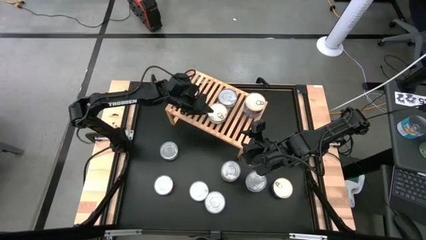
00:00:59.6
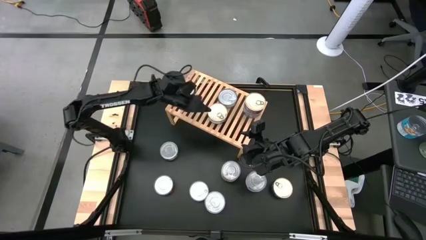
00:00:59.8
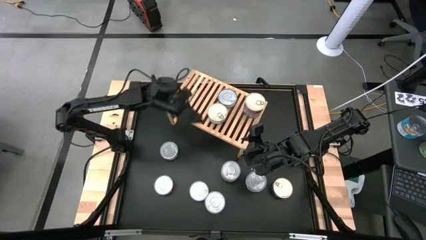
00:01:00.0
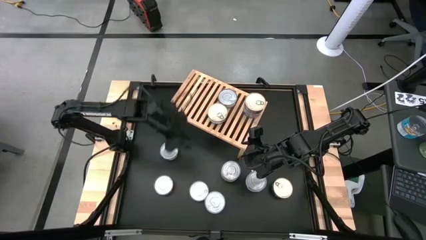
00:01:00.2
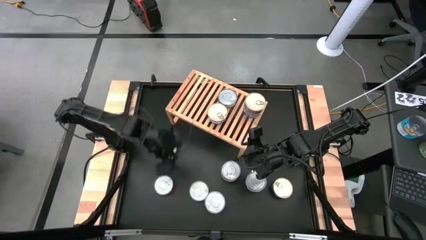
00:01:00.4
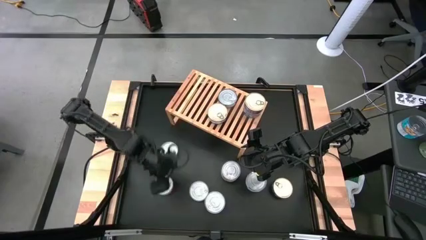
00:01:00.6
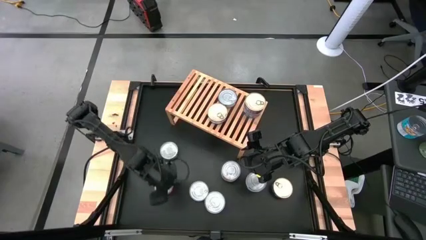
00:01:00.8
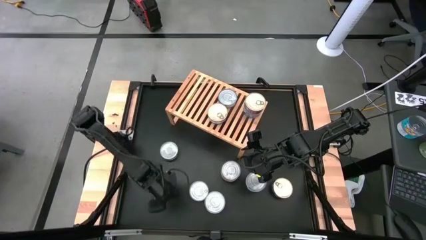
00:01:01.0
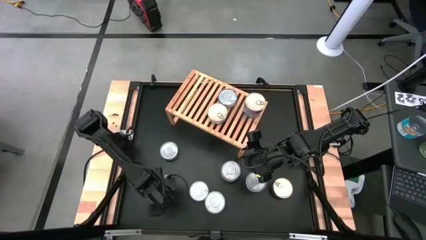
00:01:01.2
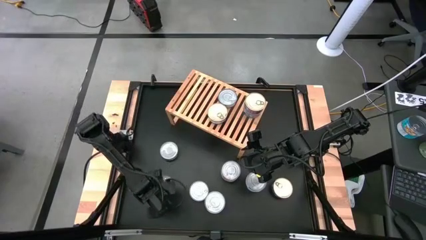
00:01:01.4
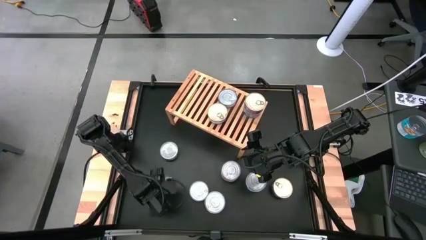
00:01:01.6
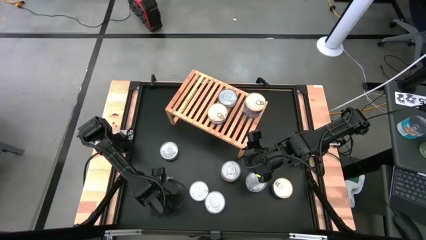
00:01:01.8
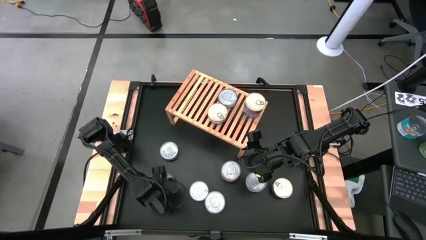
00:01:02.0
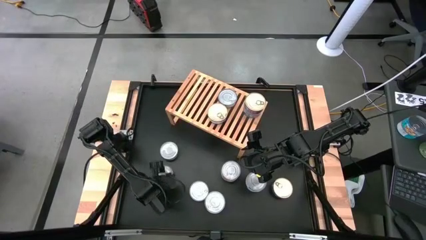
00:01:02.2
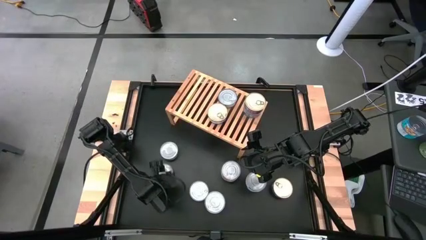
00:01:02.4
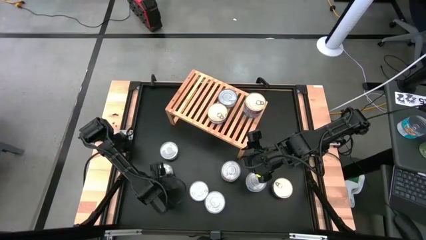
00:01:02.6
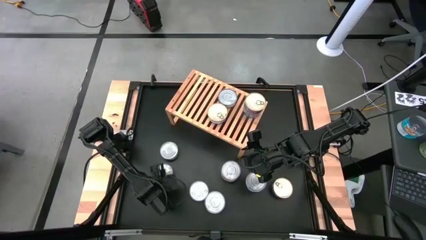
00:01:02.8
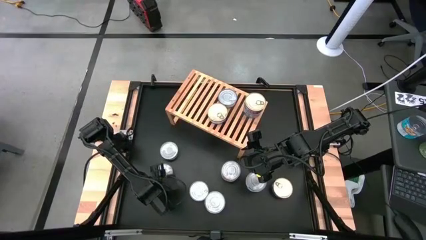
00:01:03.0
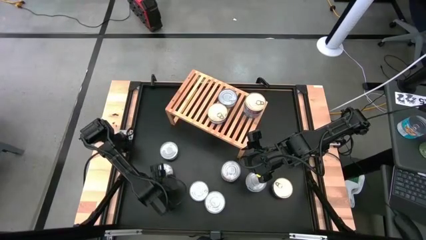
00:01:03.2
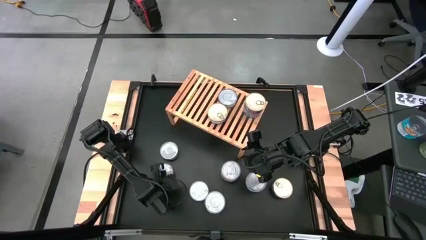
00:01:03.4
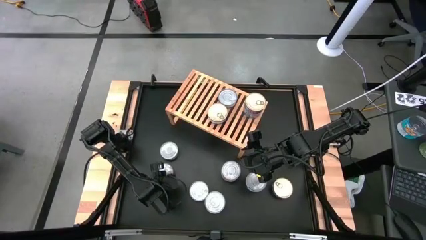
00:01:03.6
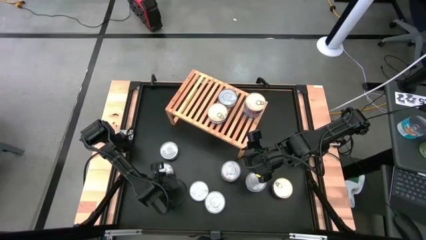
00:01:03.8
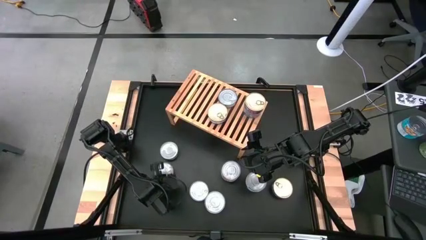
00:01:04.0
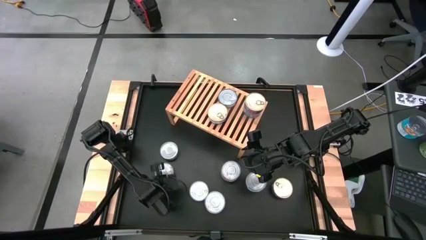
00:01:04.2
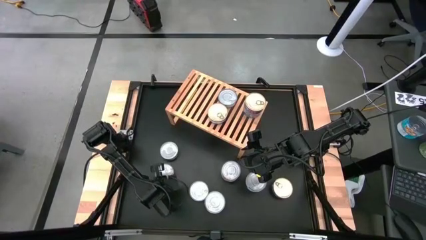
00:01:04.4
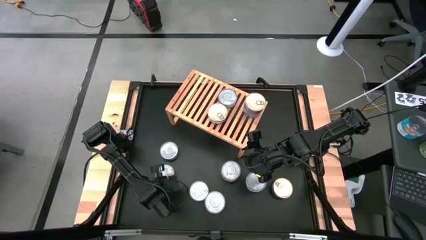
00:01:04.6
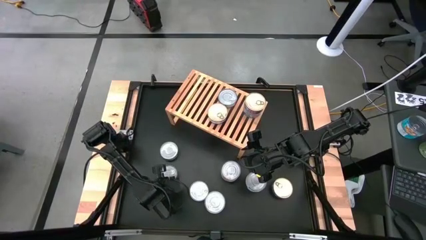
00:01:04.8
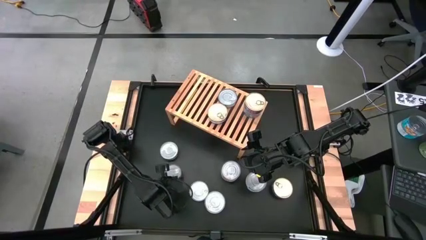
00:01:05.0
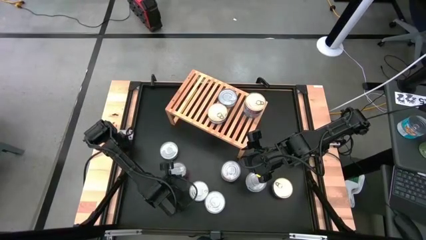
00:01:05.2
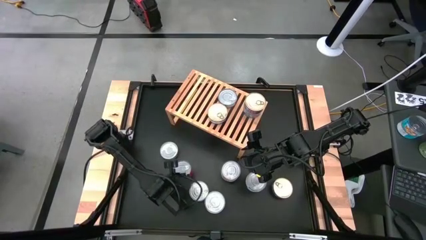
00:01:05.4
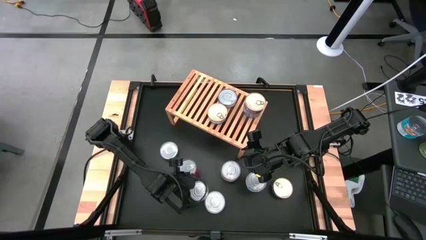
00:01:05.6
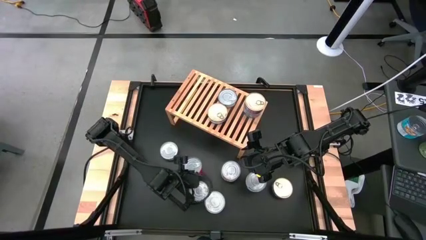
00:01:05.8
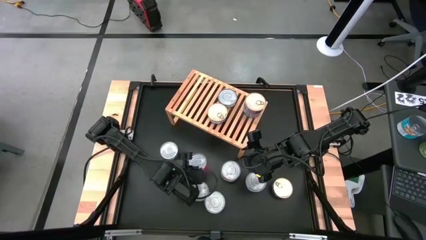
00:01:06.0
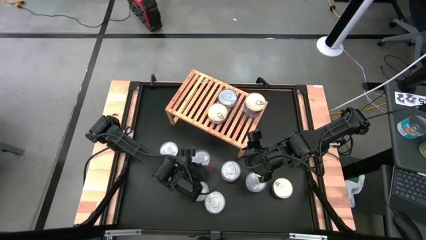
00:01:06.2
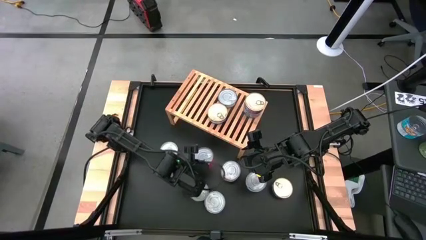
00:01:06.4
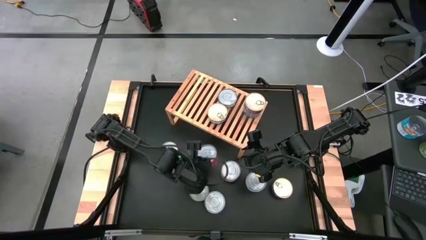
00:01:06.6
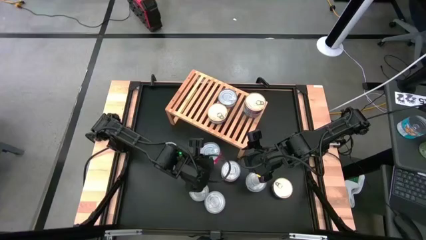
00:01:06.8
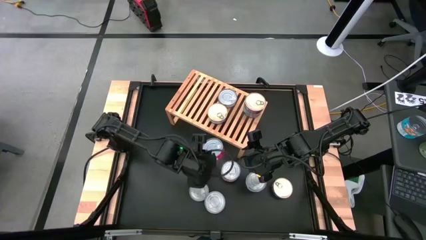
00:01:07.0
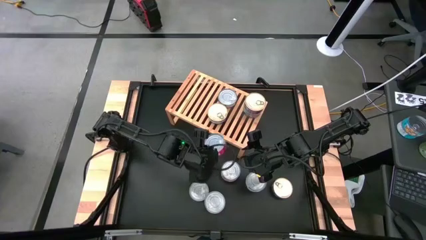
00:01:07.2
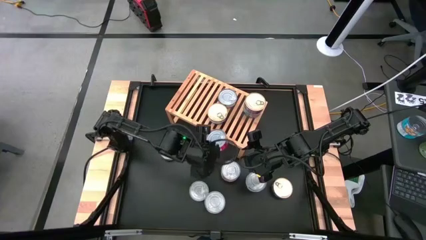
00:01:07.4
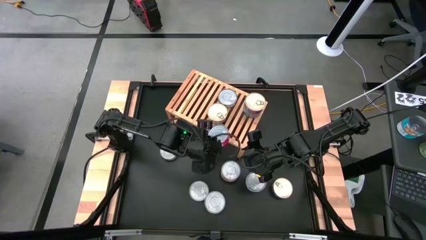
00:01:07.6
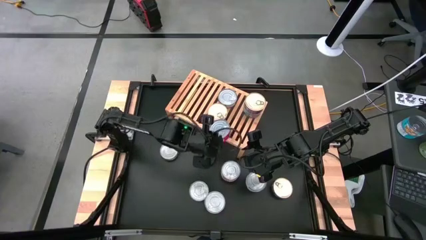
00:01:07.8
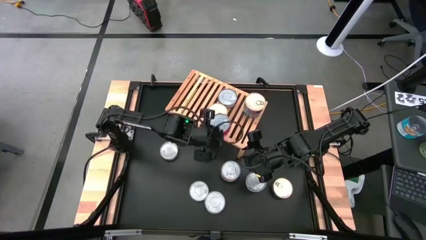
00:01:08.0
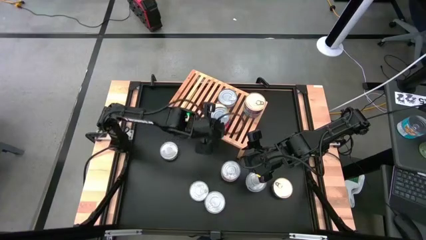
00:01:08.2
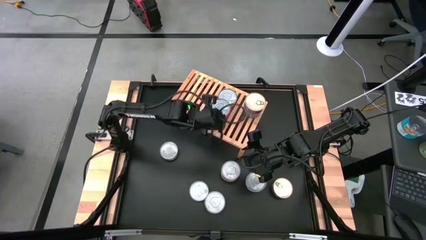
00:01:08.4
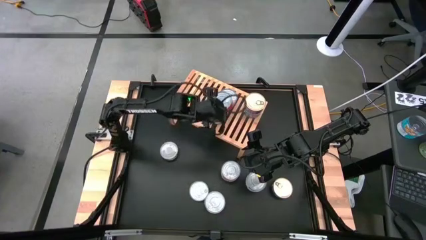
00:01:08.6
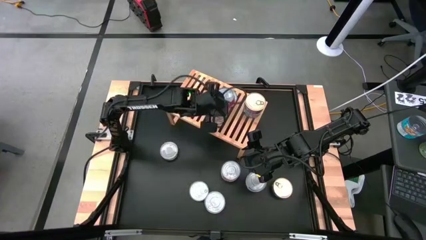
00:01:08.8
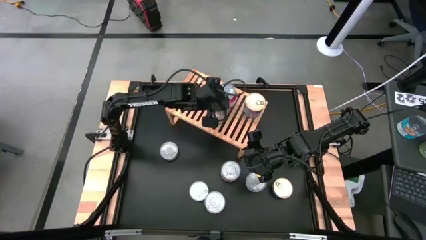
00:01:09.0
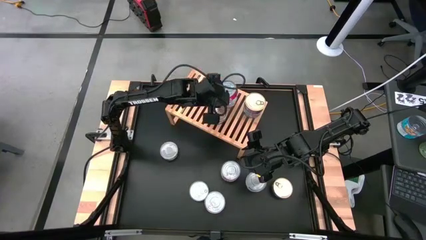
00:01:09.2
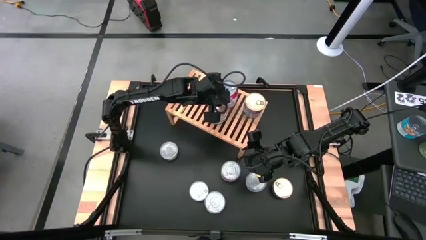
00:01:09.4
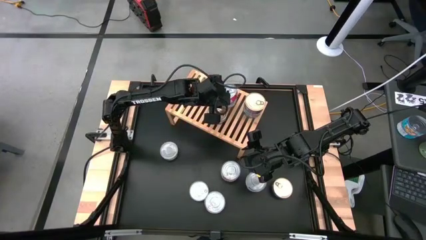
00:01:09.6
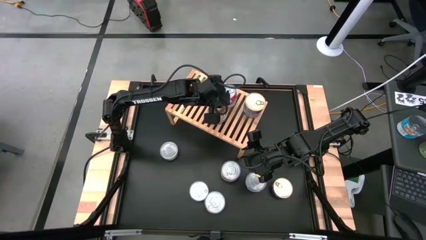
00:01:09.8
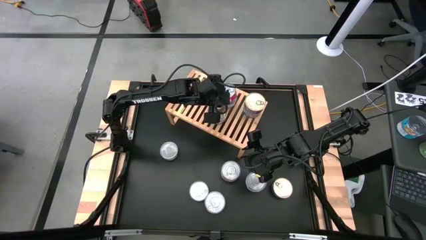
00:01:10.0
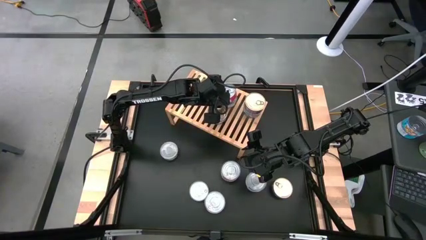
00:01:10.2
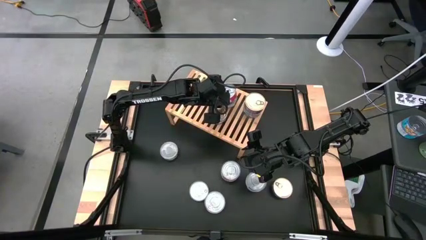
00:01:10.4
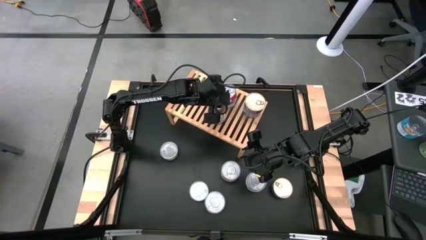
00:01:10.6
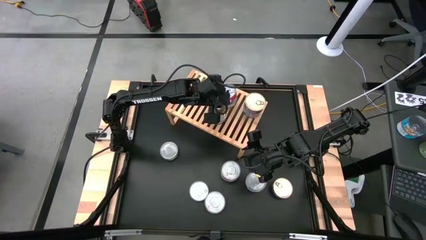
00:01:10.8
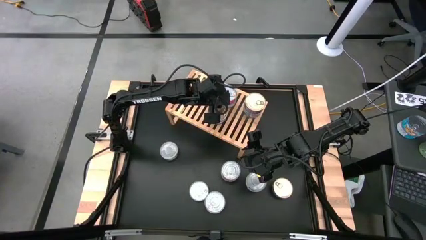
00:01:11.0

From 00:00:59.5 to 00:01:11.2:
Task: Stack canned seafood by type on shelf
Stack the red tuna can on top of the red tuna can on the shelf

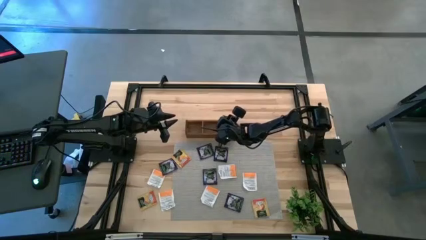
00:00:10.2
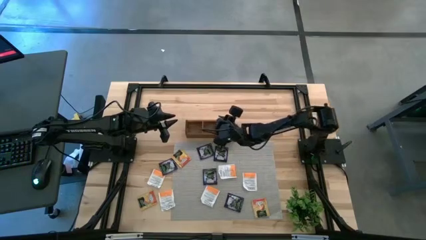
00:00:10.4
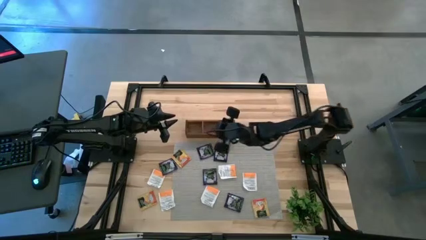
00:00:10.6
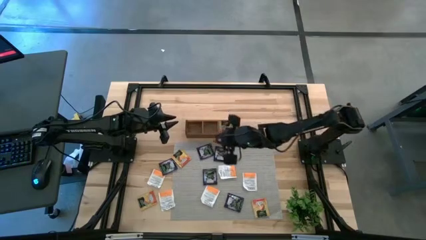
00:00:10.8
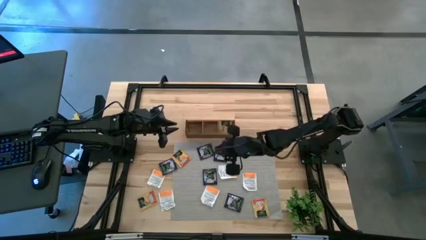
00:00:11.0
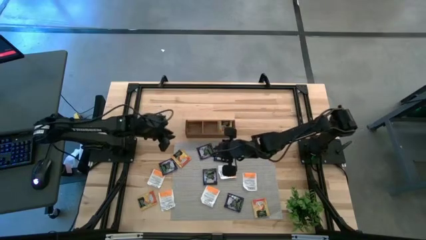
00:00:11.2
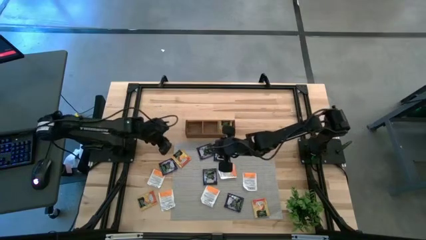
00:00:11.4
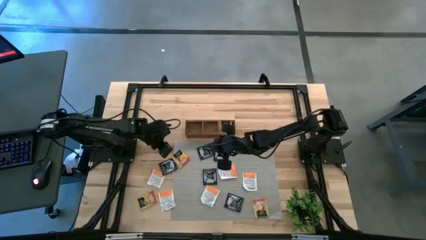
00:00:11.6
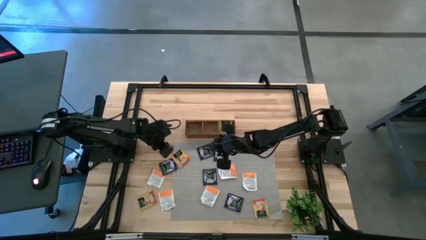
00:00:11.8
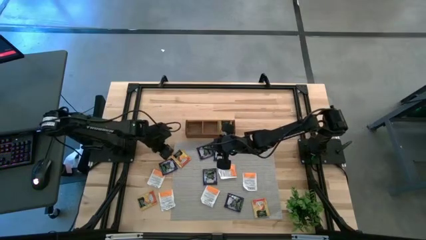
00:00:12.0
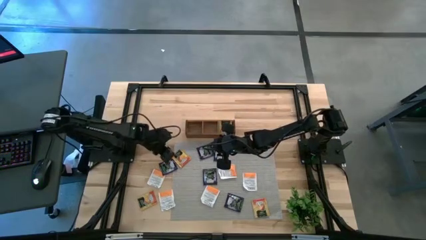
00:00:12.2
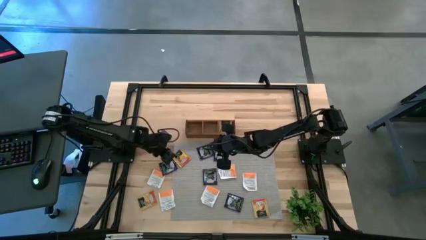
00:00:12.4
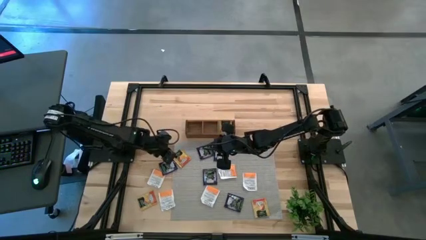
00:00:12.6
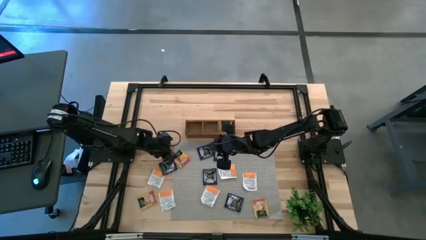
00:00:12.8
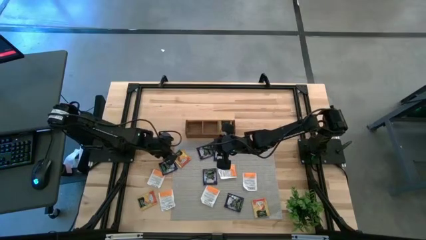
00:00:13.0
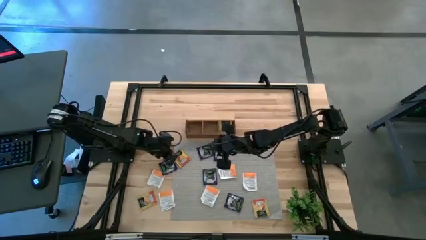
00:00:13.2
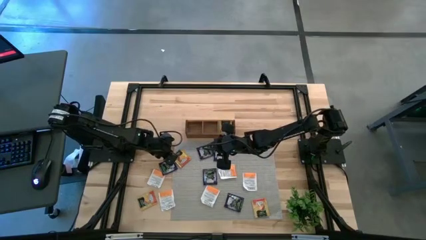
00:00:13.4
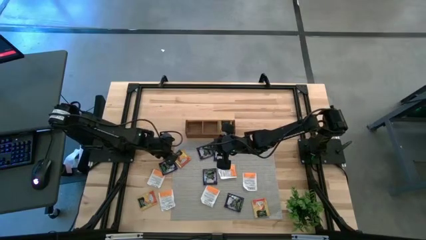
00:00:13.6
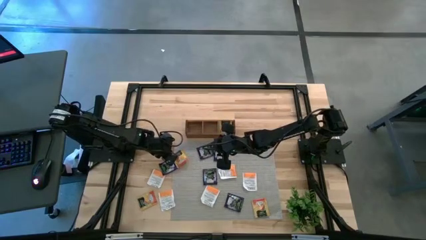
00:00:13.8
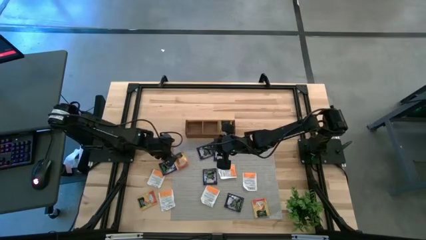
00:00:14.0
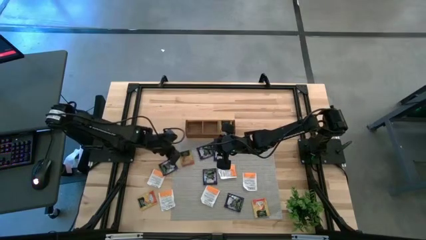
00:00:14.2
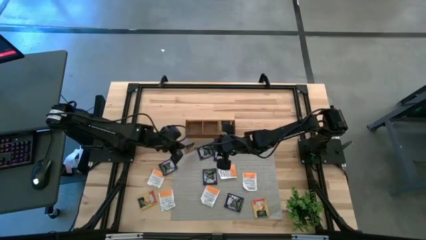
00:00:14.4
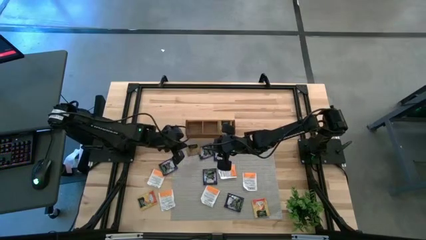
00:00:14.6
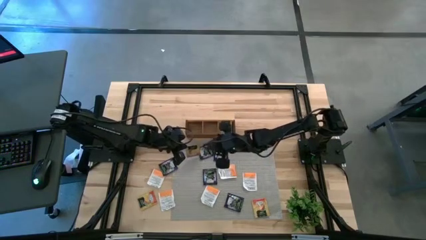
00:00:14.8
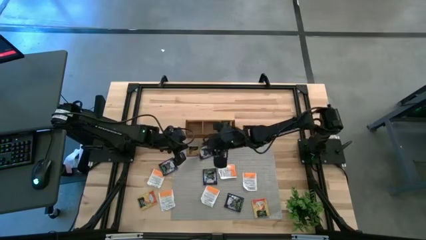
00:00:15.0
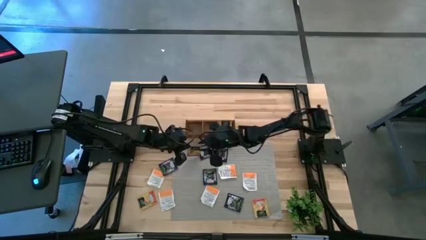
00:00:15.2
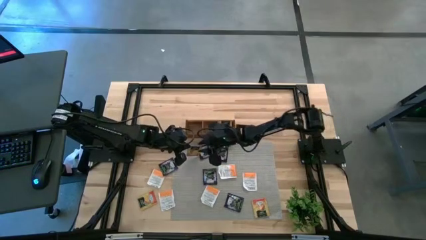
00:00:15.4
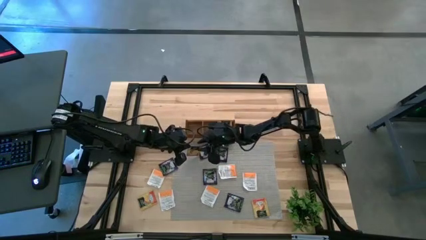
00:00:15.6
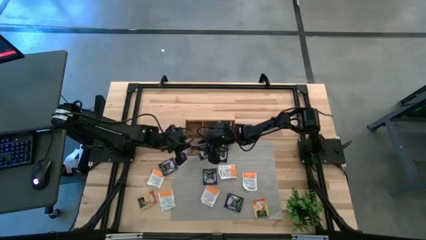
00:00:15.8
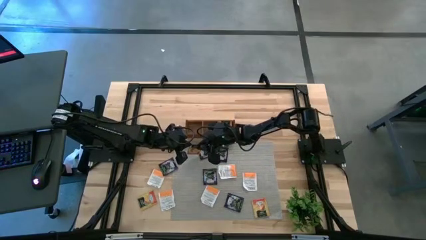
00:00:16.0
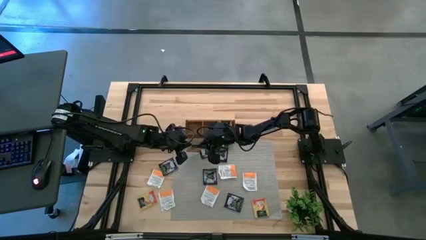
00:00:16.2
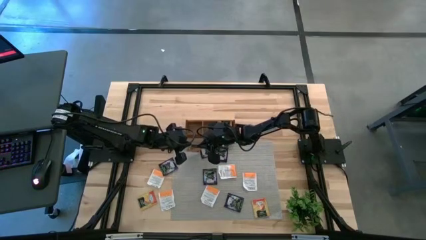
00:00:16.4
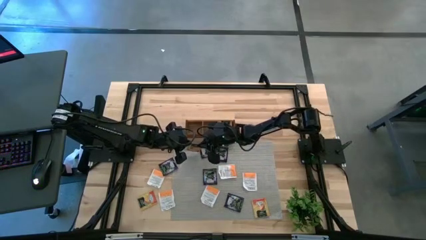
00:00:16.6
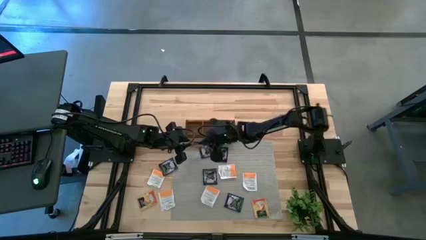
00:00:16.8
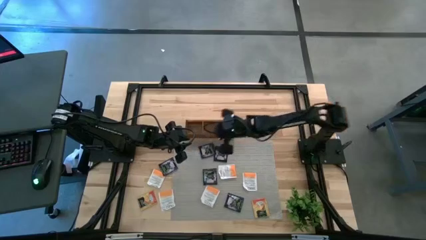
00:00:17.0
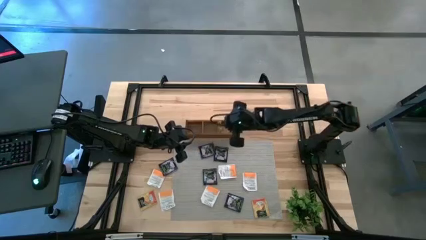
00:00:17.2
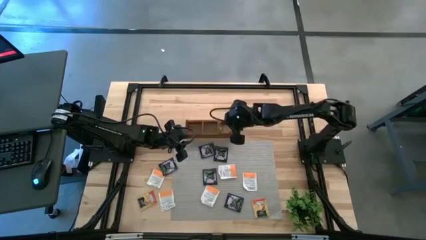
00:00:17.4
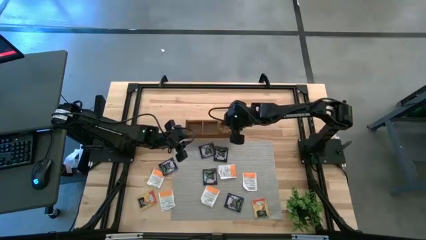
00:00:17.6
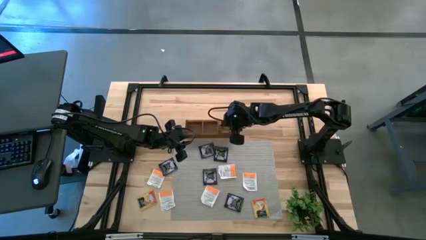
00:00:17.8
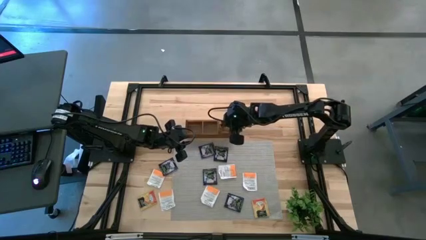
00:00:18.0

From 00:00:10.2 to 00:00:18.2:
Task: Pick & Place Tea
Put the orange tea bag into the right section of the wooden organizer
